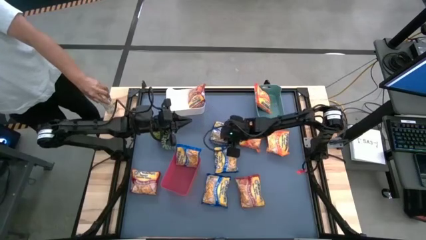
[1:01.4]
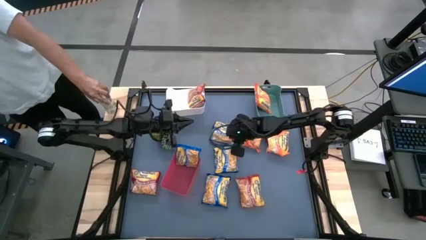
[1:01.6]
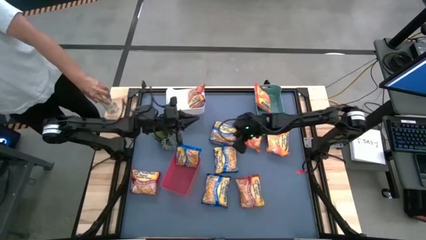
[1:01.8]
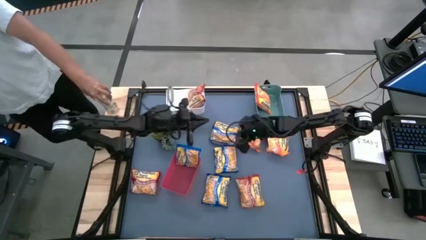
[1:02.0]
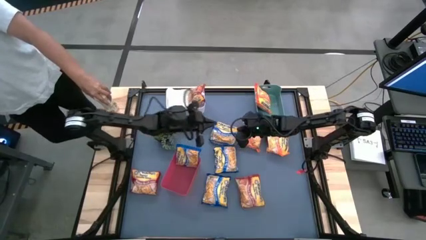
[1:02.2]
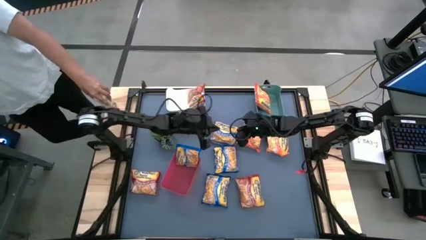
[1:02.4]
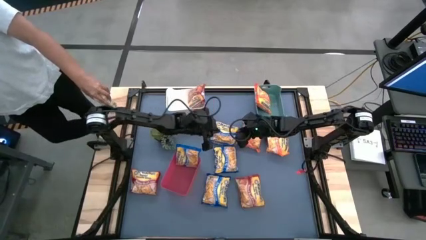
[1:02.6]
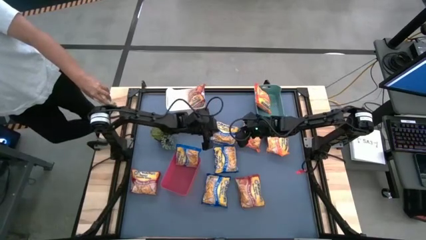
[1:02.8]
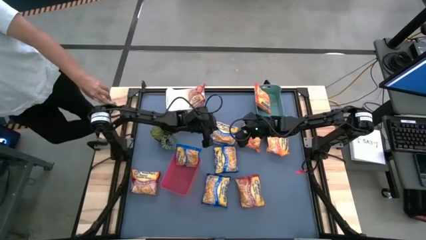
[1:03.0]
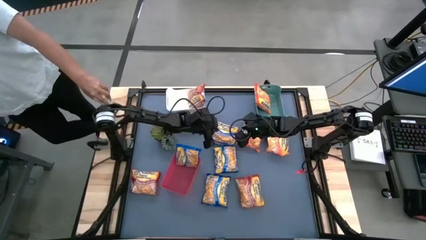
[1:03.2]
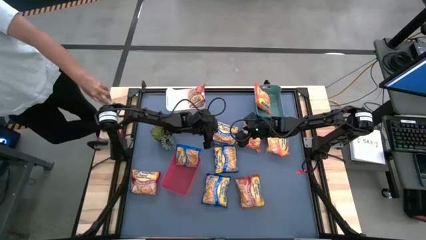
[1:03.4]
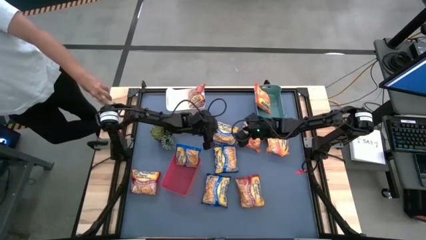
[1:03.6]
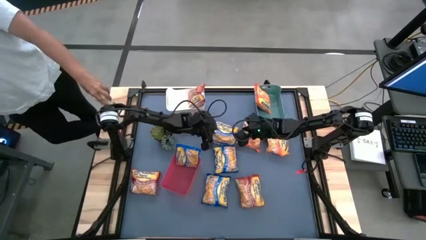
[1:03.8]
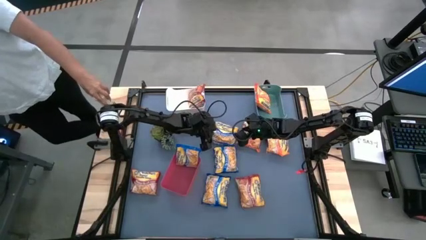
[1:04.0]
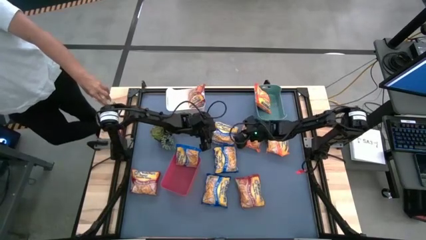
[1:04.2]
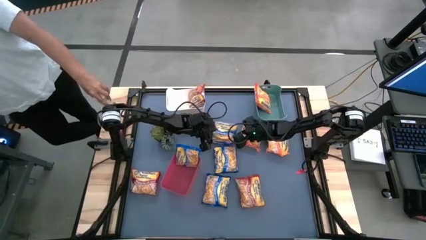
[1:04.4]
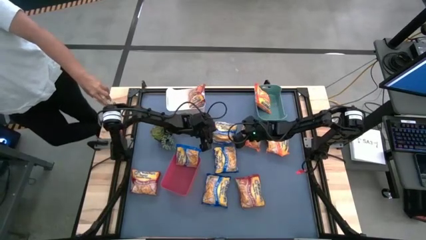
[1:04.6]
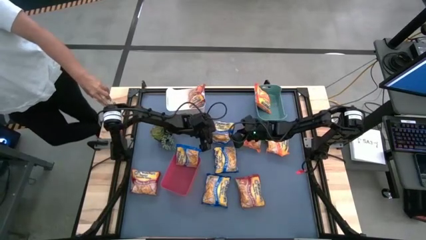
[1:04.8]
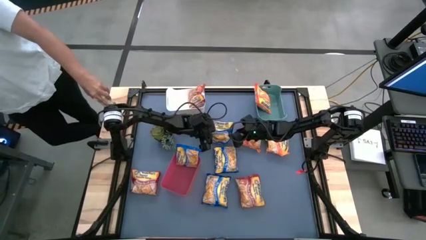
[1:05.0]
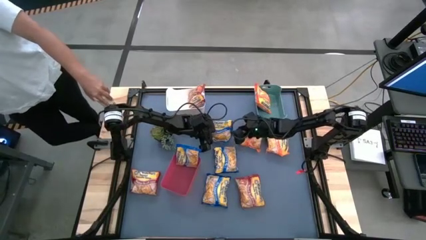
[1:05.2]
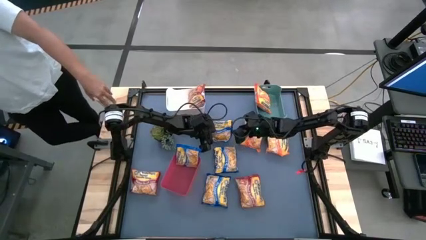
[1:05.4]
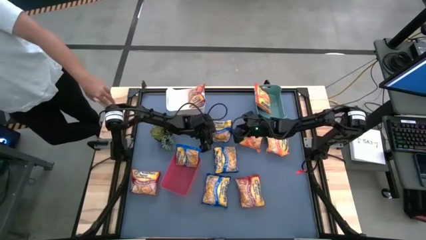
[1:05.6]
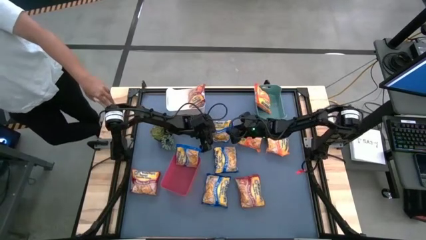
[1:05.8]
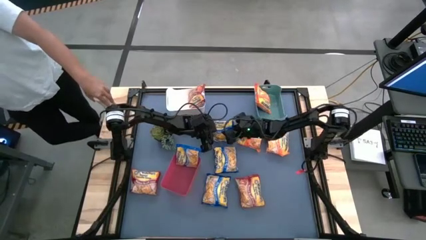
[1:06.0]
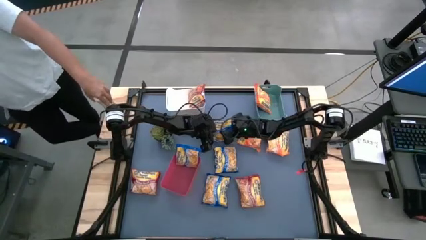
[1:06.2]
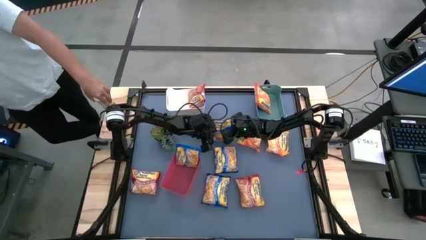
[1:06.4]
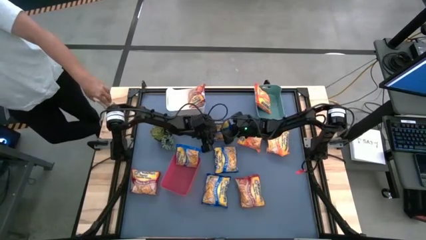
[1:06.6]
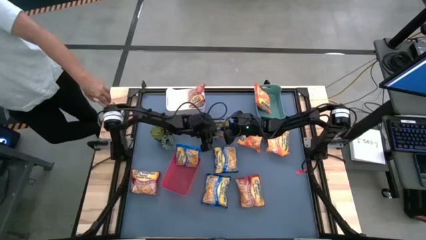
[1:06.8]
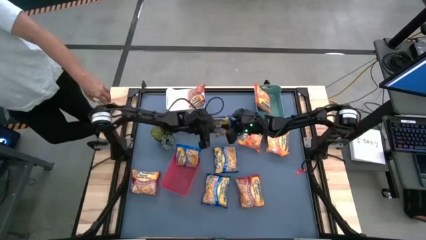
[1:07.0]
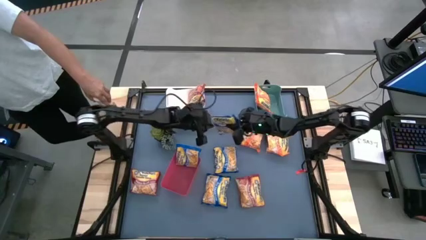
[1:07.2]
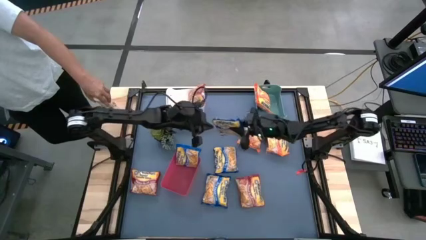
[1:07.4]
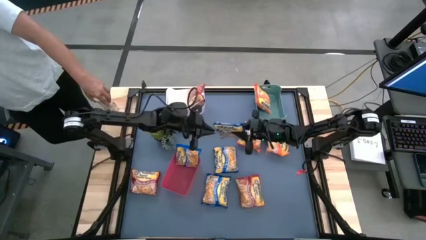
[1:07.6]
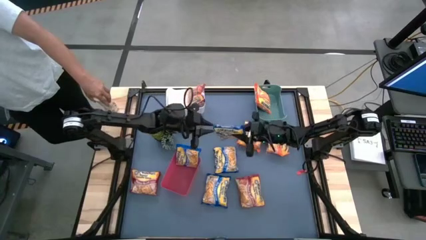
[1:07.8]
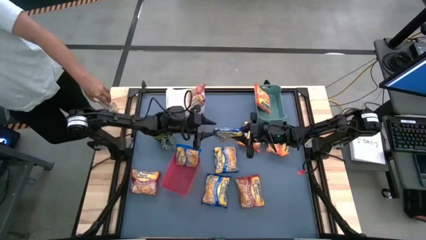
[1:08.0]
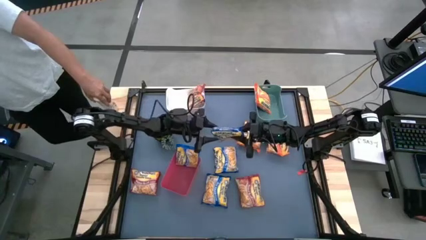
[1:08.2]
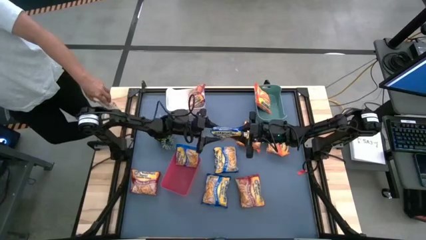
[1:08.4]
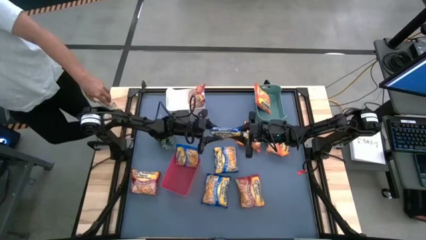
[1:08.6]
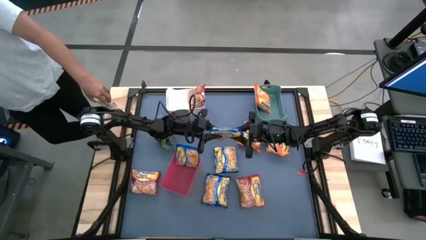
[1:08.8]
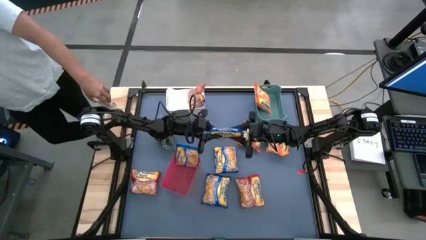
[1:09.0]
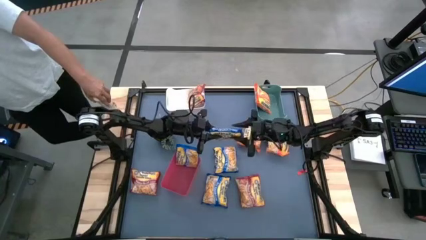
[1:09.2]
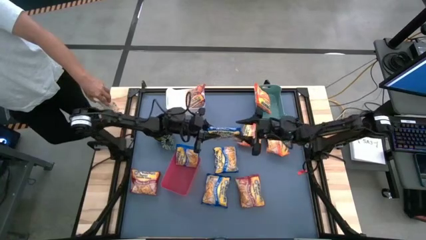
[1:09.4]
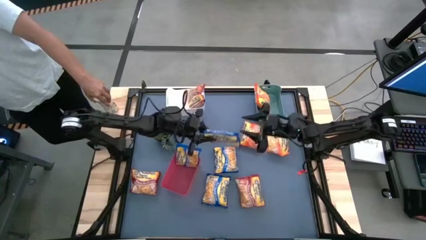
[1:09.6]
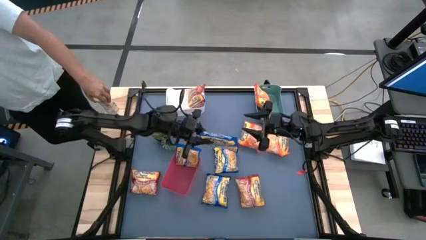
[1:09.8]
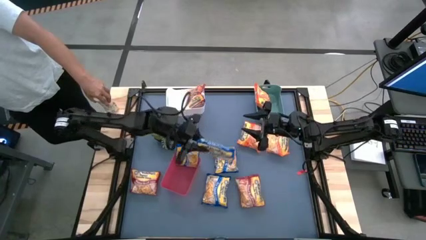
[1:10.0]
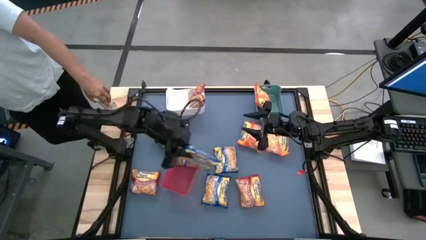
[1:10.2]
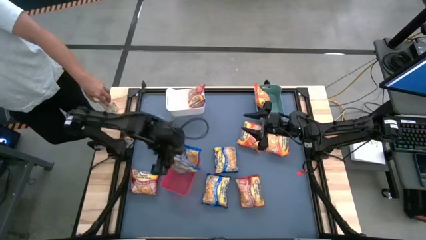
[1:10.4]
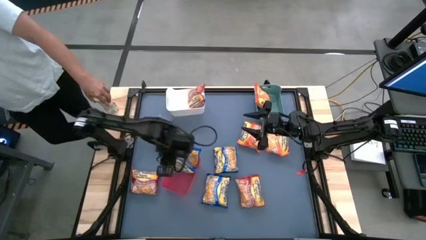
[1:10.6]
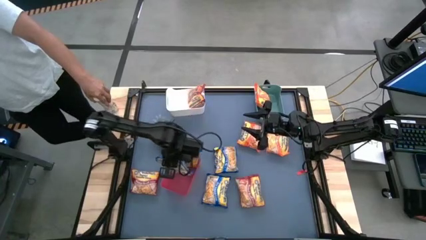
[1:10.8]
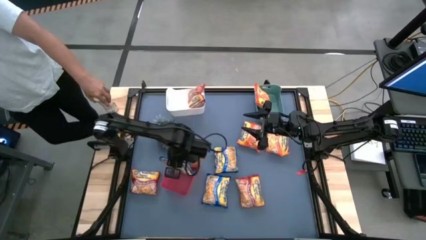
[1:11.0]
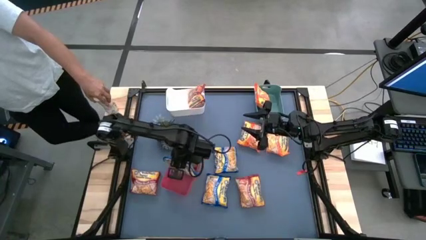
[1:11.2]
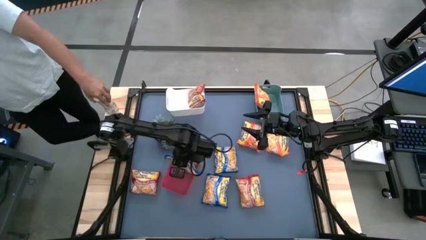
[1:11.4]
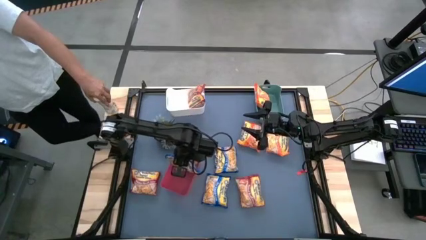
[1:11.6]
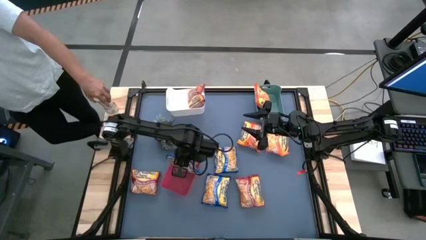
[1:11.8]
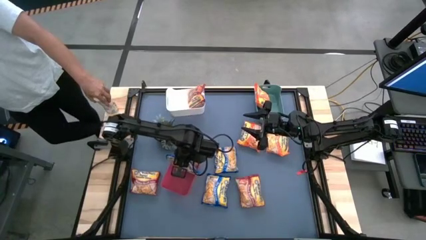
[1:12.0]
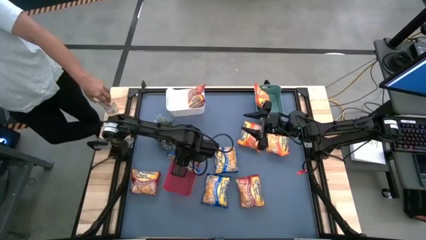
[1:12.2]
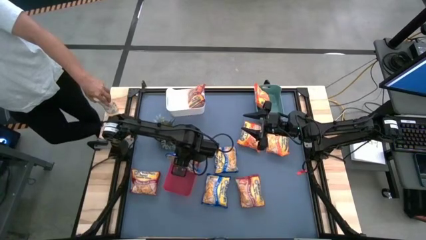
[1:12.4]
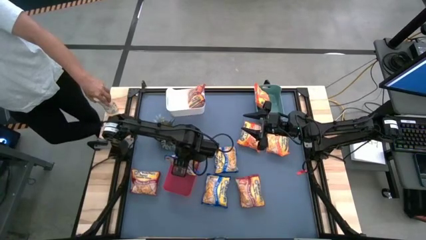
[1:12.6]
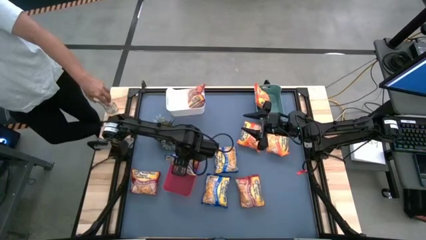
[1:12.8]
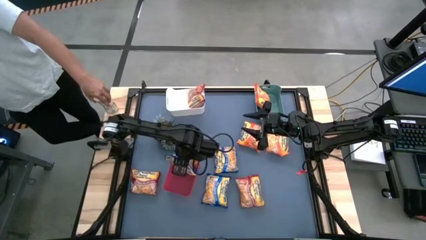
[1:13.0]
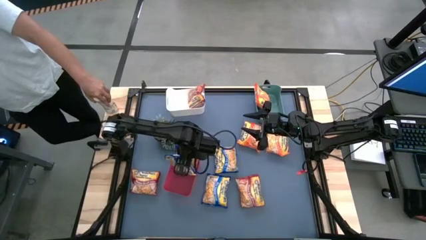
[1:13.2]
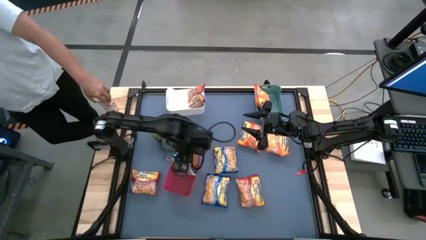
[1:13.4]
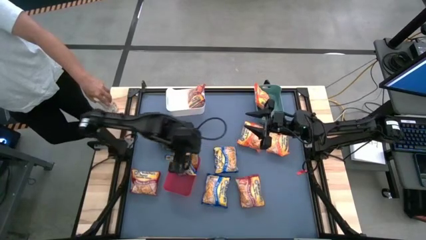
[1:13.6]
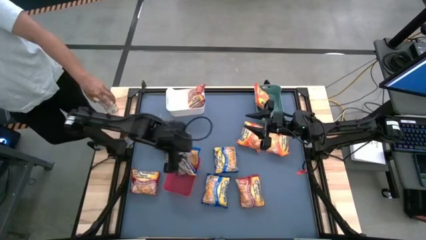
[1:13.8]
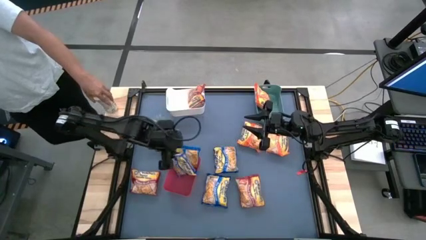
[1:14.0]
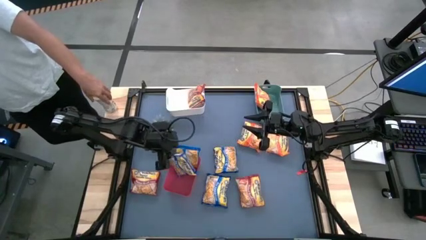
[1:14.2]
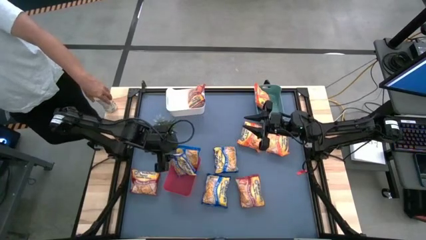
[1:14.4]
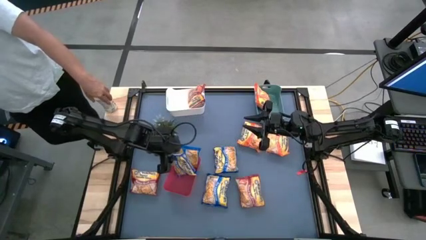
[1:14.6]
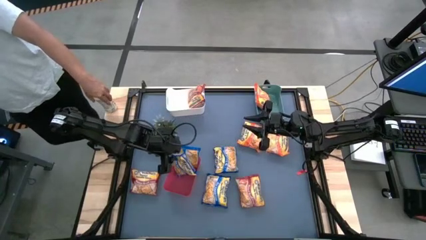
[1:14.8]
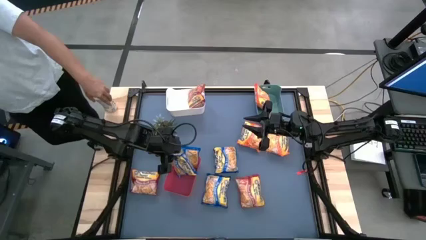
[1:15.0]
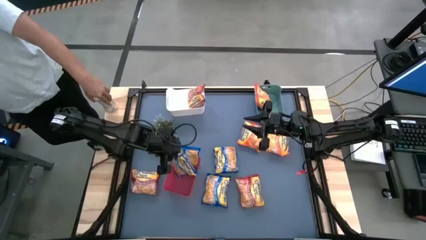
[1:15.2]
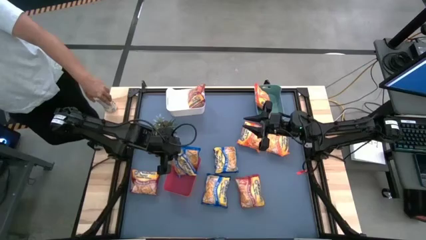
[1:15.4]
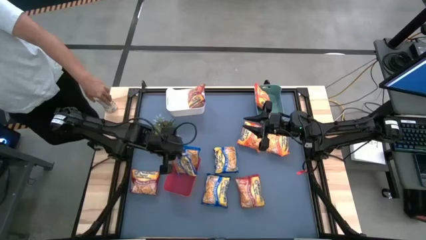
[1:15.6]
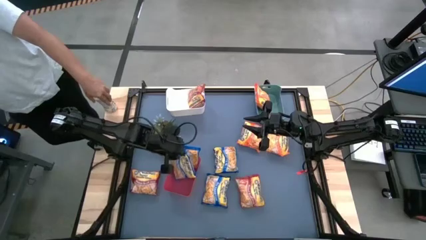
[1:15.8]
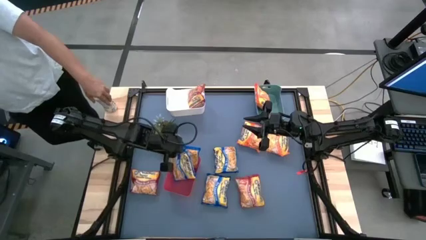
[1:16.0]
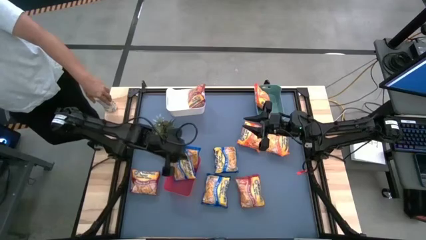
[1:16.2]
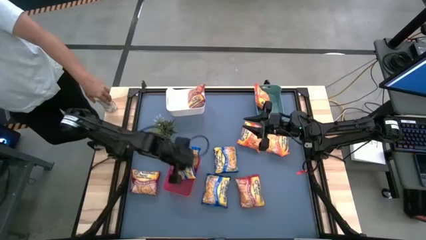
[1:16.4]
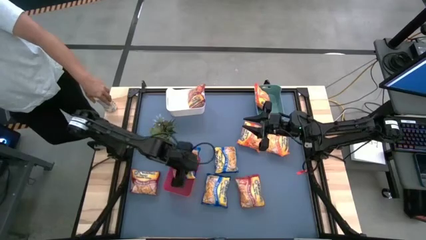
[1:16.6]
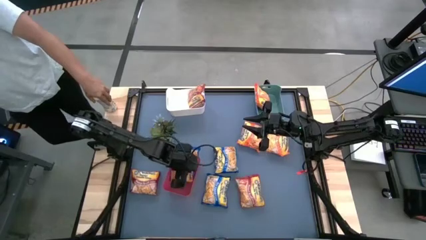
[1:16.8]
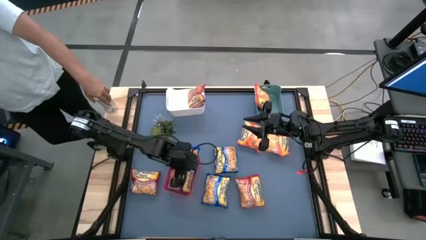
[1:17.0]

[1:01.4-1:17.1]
Task: Sort Maruchan noodles
Put the top blue noodle pack into the red bin
